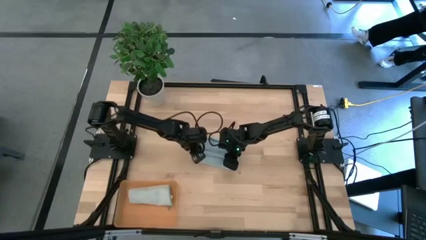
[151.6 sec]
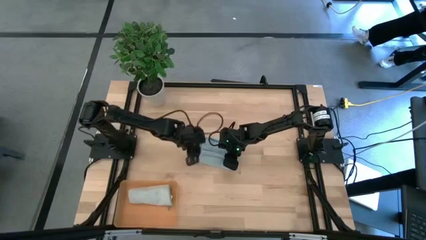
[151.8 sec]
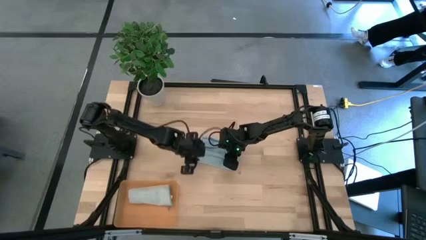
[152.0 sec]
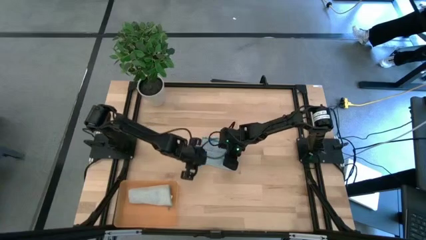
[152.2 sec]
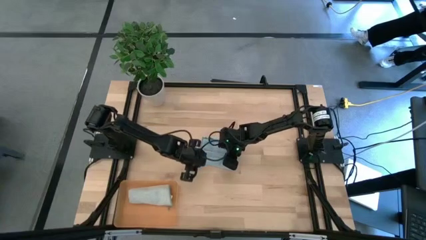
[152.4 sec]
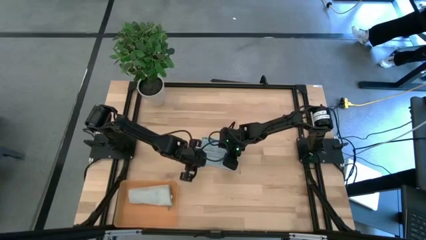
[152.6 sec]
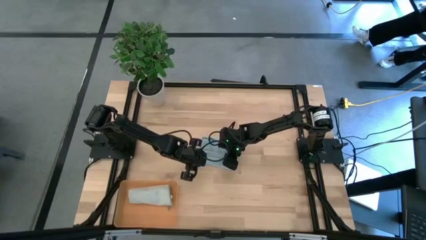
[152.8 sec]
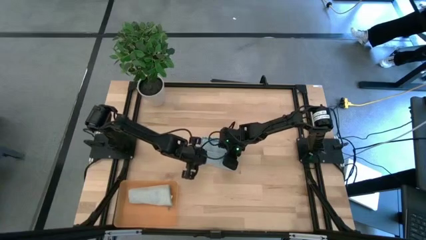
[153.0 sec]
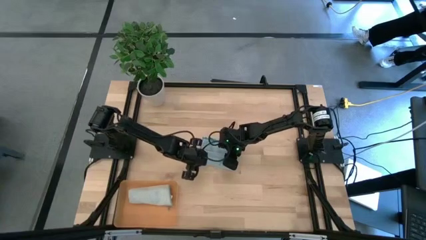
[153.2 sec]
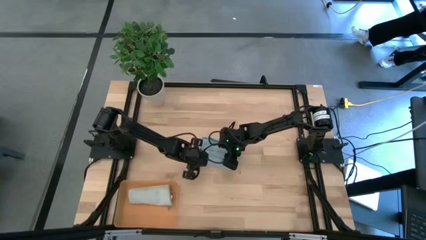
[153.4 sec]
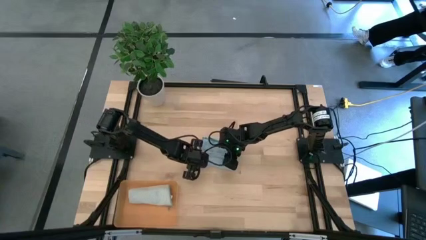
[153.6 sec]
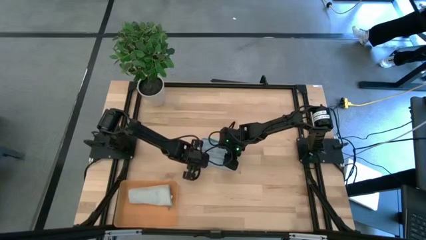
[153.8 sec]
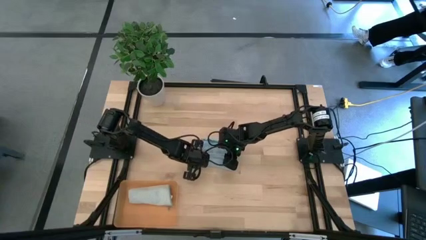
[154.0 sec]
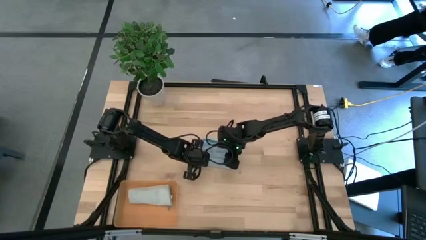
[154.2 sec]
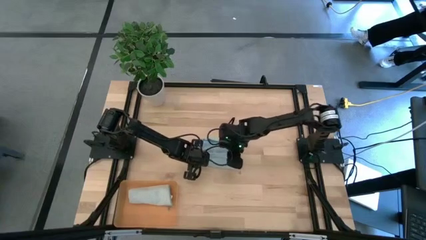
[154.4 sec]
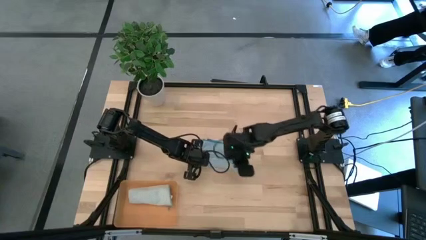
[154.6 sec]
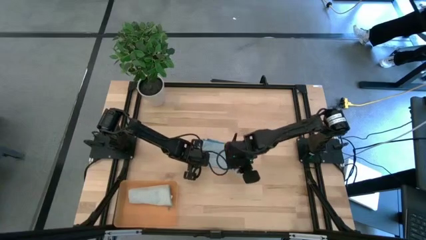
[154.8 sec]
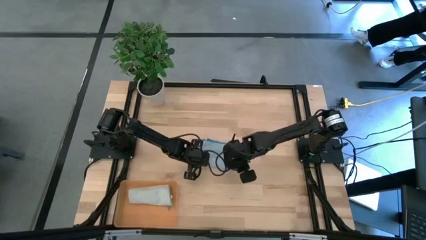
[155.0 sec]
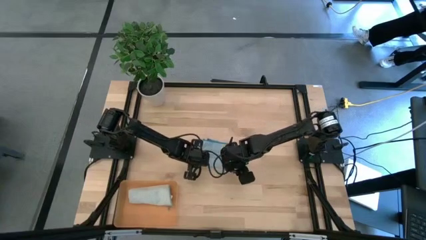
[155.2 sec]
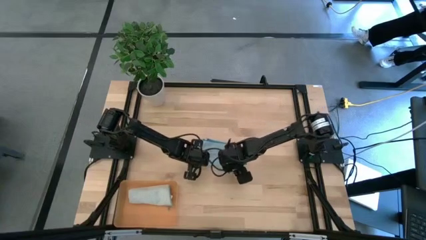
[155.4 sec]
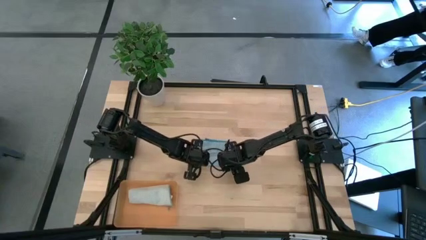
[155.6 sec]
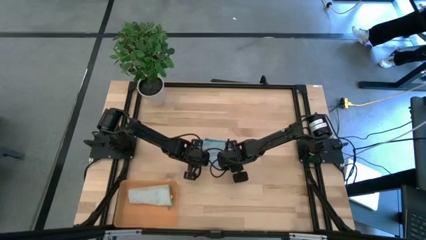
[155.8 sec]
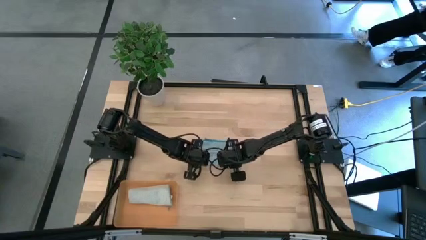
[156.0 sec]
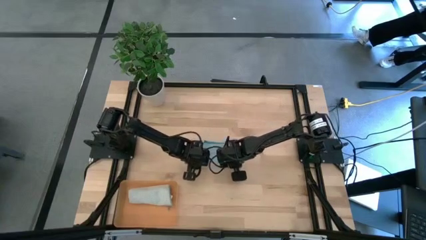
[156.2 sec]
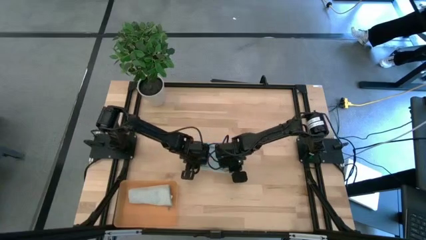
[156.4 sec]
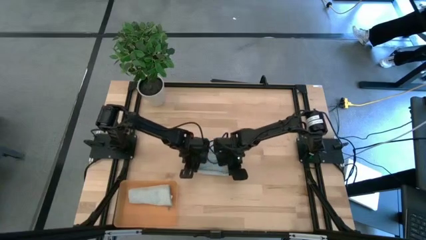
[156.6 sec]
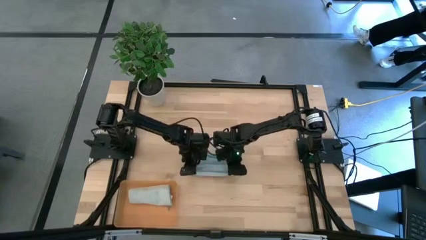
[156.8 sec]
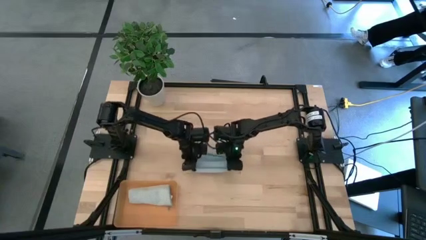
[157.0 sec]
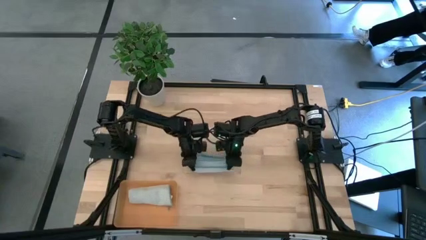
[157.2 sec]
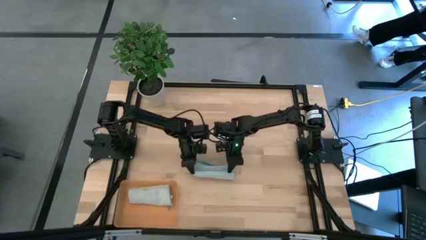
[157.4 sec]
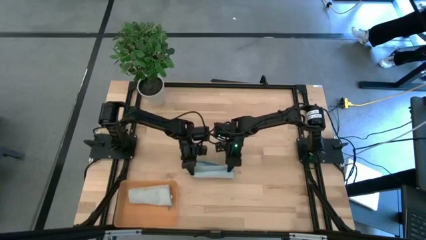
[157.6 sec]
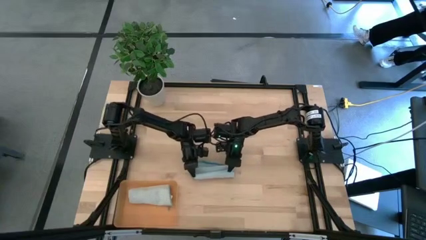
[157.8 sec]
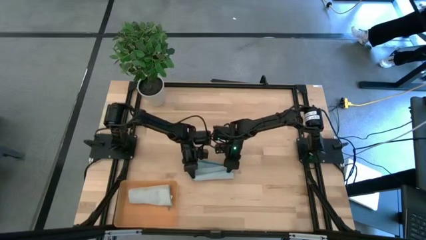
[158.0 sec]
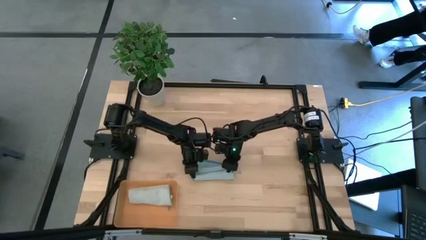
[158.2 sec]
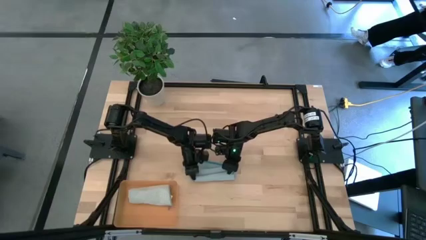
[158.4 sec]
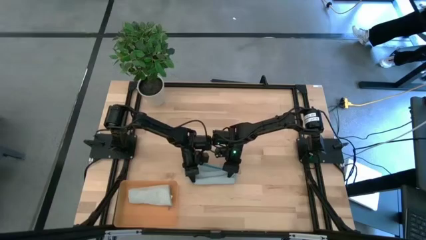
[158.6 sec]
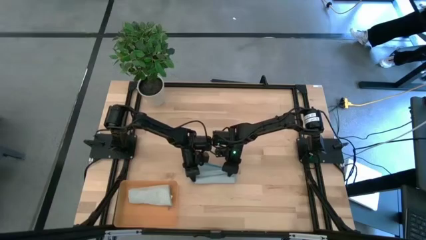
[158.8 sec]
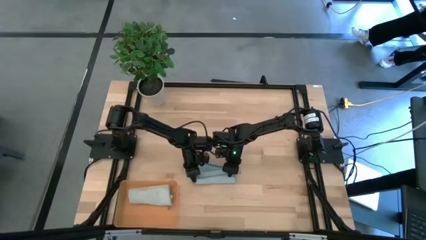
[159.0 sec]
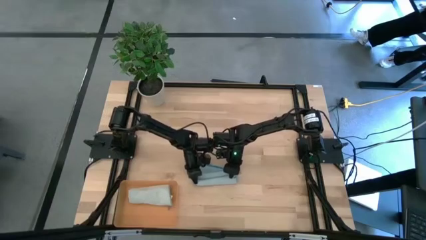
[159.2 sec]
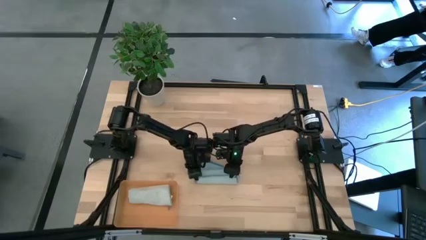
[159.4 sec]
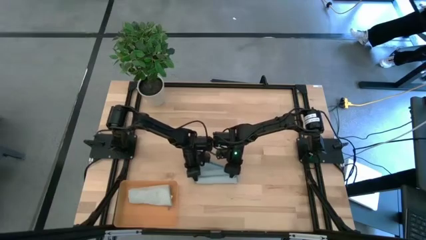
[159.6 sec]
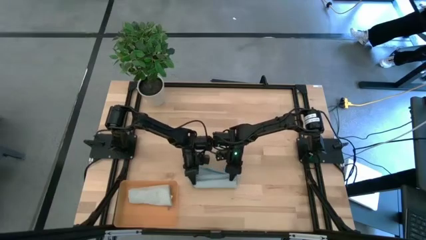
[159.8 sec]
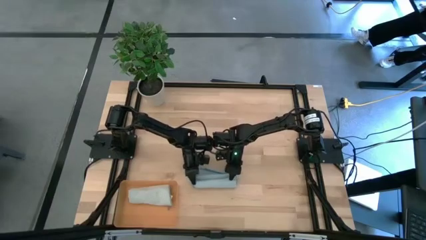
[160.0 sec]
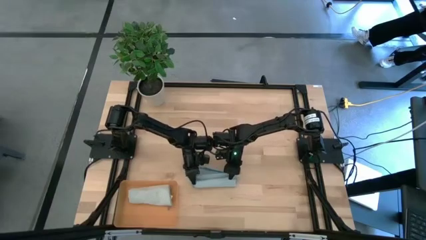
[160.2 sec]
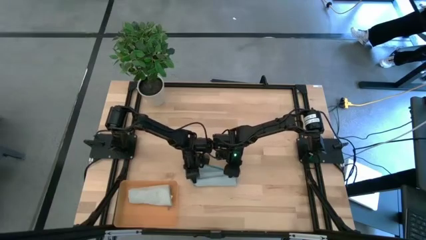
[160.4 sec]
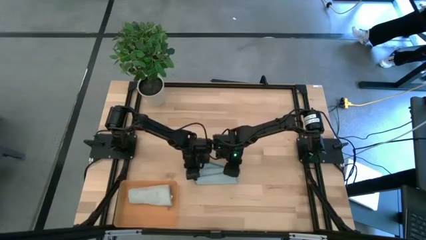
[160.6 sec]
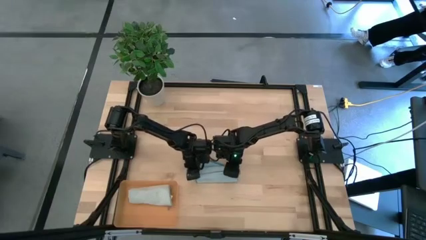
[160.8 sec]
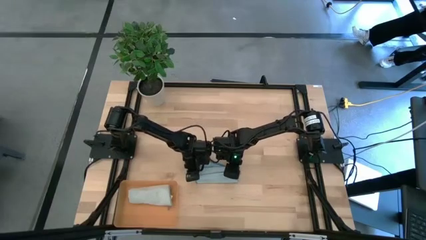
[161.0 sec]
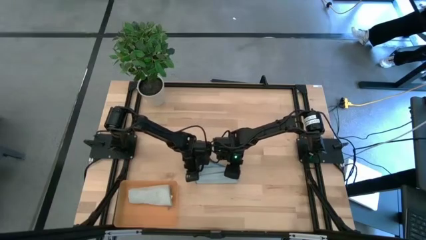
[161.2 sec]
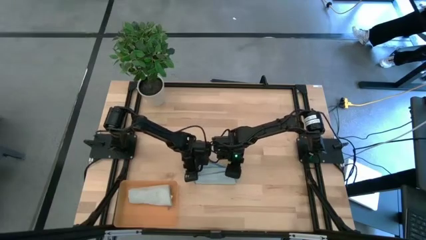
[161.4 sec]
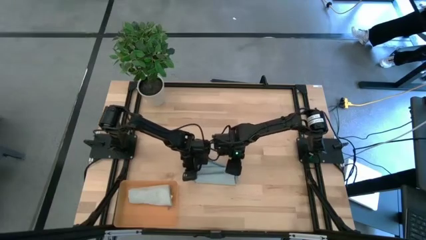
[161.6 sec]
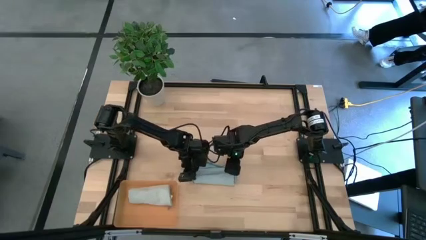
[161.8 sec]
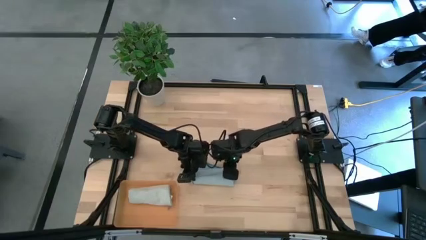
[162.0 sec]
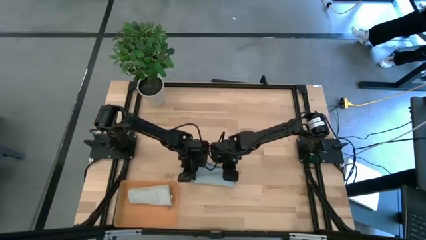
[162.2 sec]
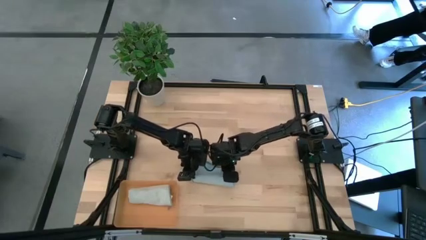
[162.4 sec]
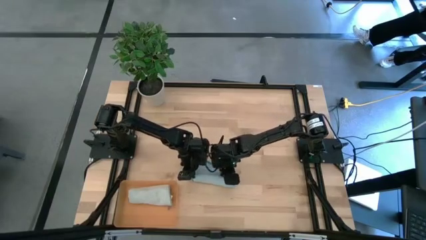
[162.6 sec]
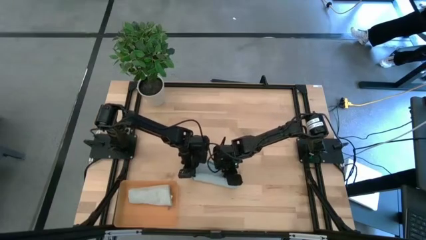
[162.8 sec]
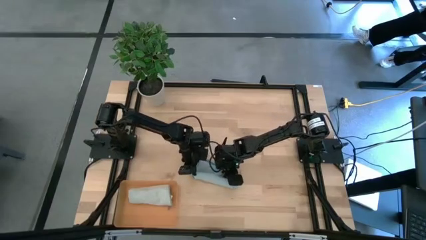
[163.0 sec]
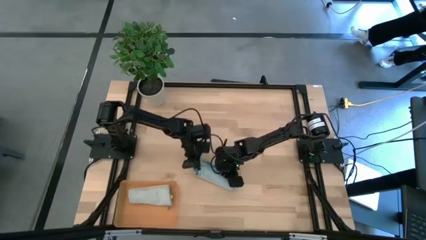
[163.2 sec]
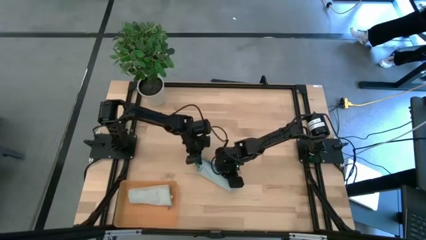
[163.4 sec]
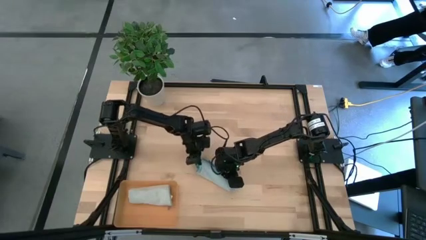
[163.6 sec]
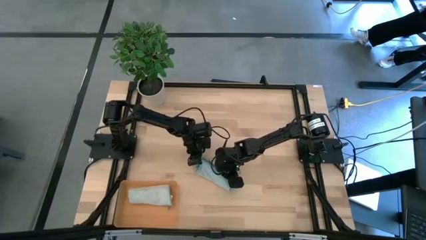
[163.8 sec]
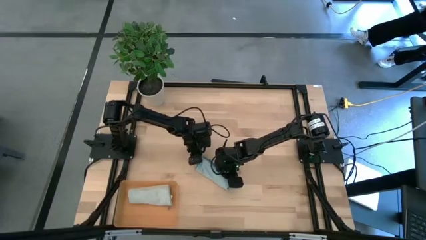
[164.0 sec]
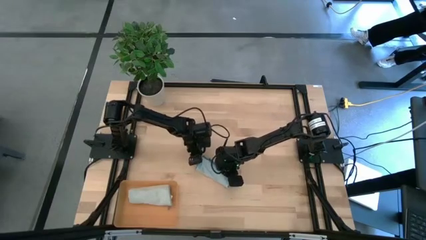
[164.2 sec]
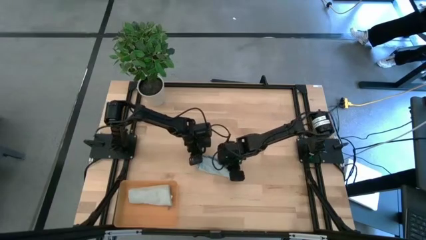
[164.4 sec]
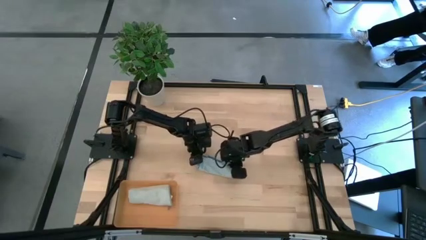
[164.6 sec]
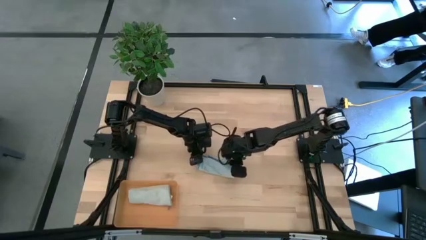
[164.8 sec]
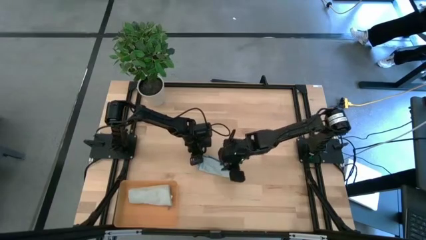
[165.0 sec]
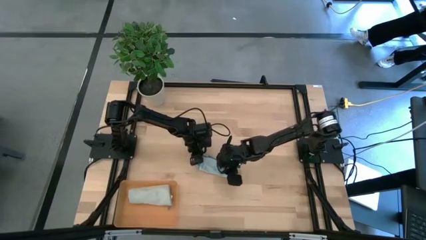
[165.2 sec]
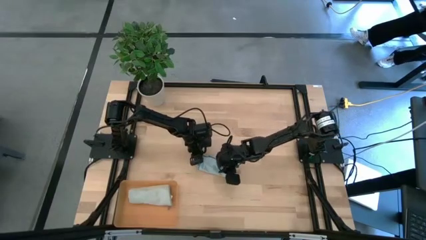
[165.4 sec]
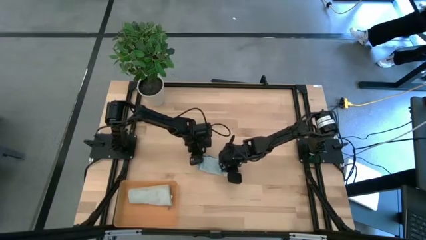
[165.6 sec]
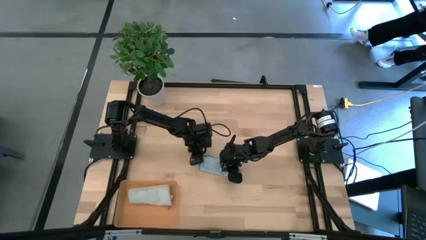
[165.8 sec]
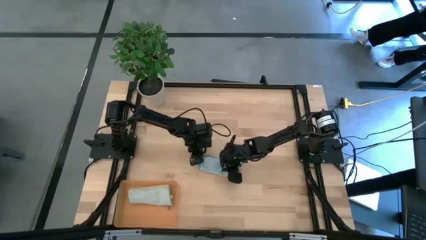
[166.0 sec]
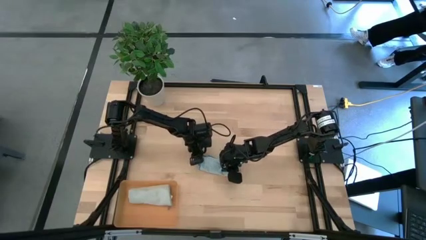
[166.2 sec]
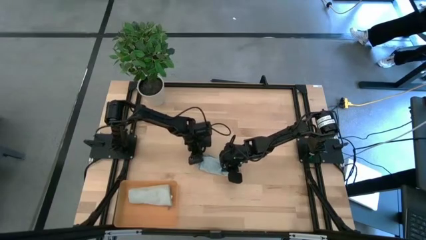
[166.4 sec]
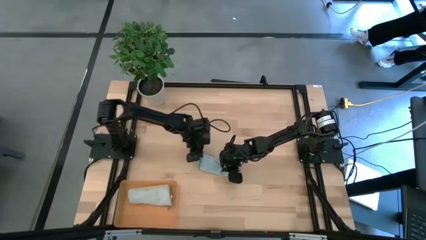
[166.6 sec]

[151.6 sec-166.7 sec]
Task: Roll microfiber towels into tight, uniform cylinder then place into a basket
Roll the blue microfiber towel
